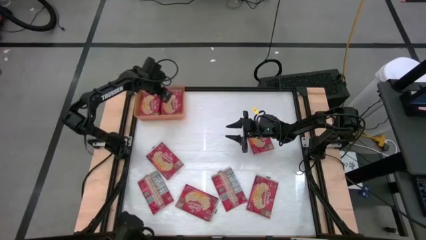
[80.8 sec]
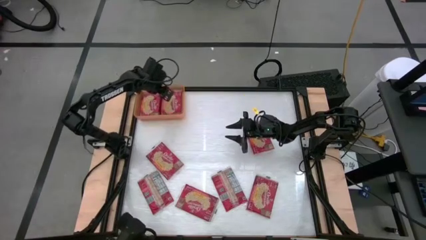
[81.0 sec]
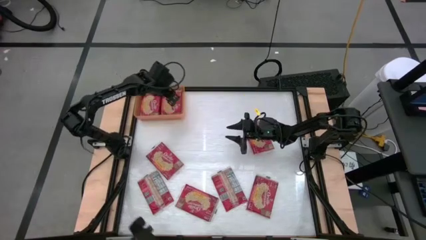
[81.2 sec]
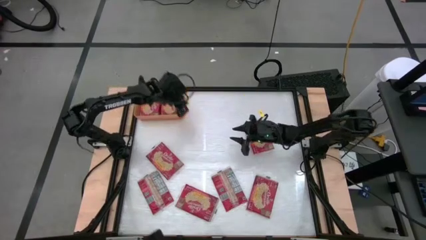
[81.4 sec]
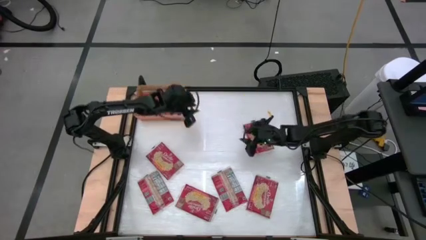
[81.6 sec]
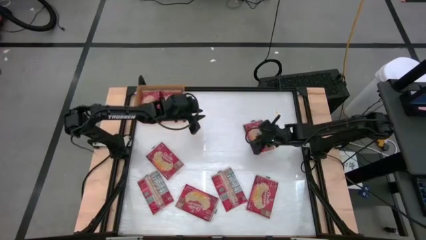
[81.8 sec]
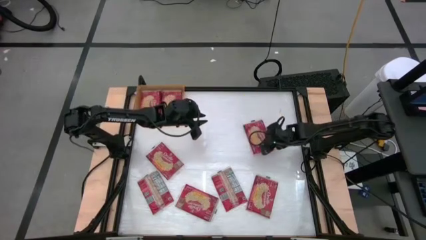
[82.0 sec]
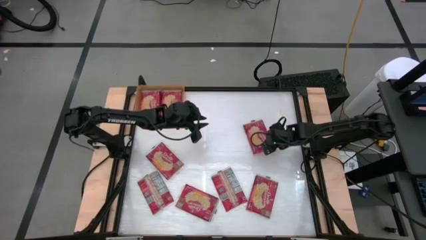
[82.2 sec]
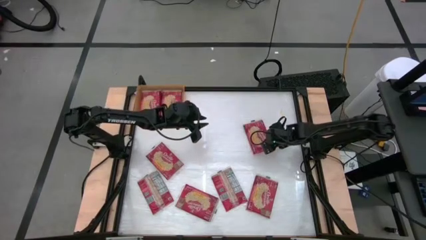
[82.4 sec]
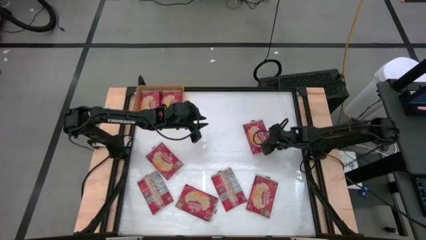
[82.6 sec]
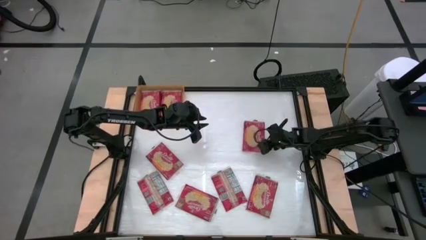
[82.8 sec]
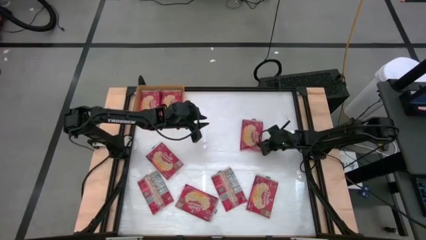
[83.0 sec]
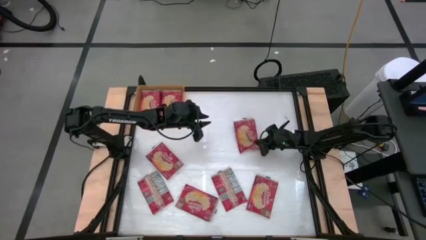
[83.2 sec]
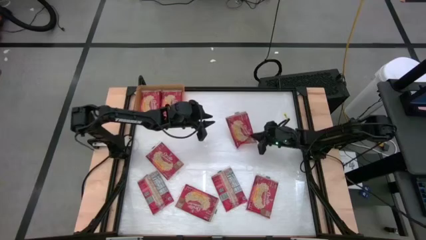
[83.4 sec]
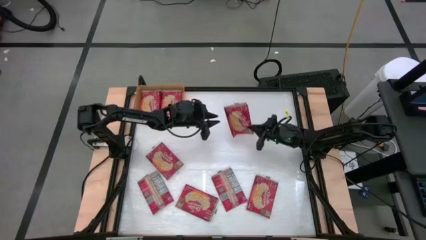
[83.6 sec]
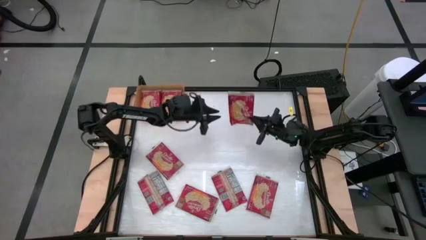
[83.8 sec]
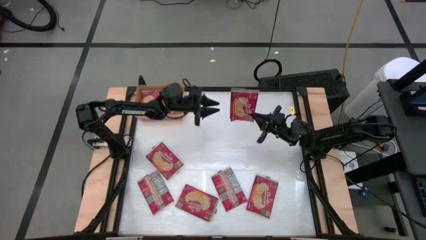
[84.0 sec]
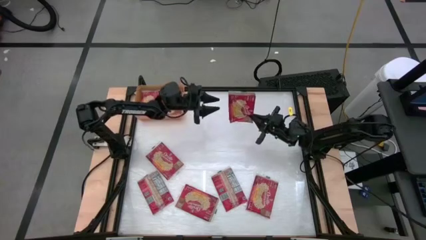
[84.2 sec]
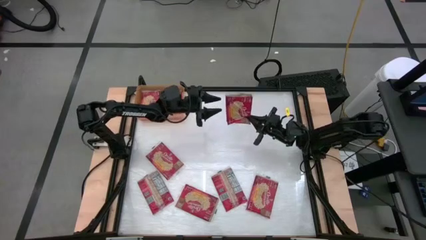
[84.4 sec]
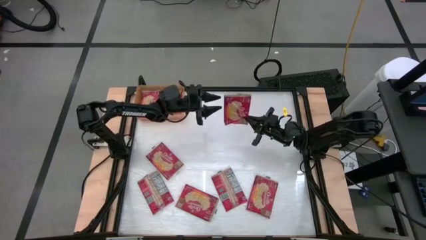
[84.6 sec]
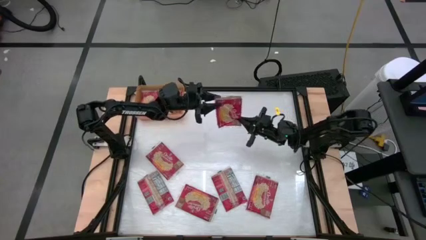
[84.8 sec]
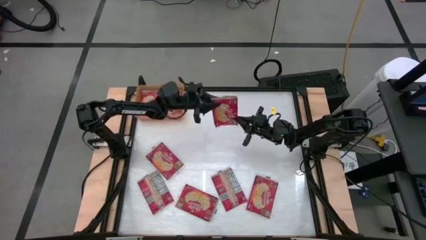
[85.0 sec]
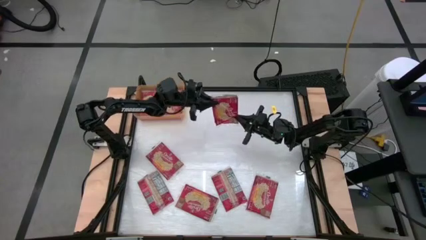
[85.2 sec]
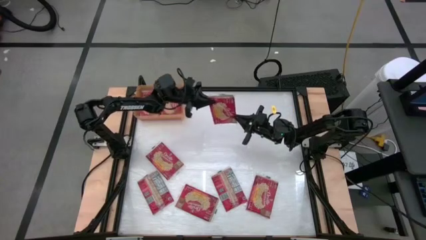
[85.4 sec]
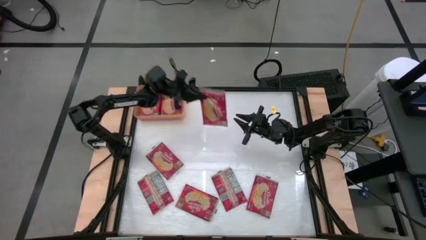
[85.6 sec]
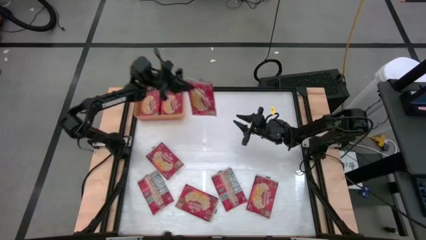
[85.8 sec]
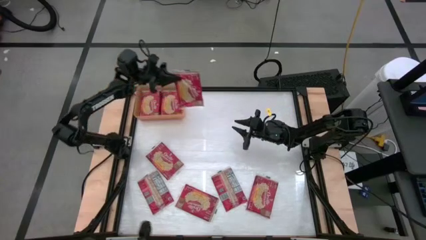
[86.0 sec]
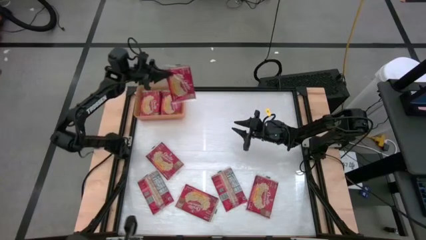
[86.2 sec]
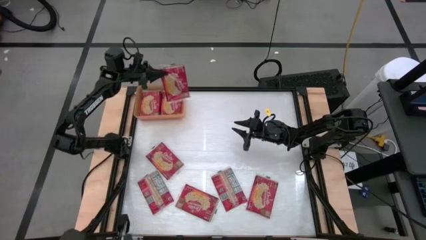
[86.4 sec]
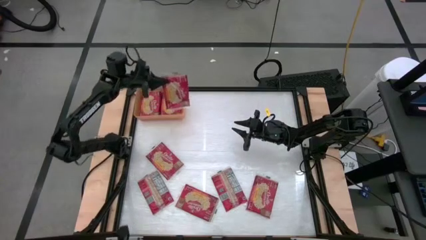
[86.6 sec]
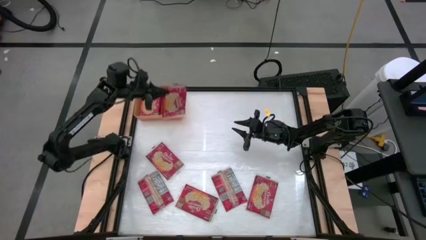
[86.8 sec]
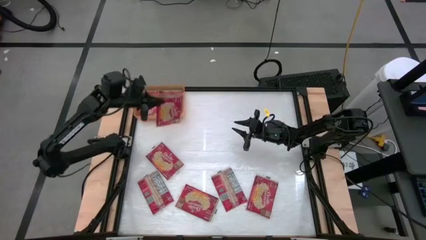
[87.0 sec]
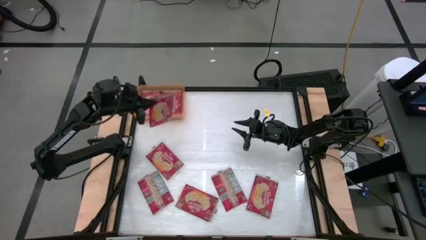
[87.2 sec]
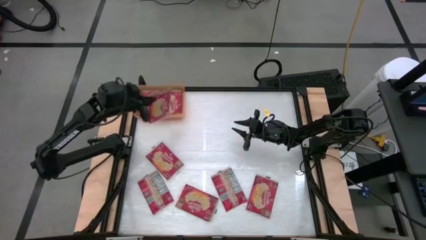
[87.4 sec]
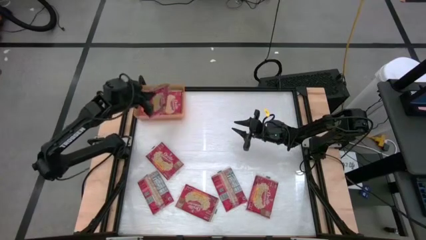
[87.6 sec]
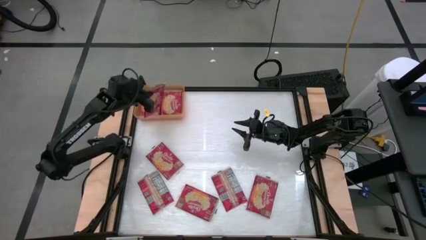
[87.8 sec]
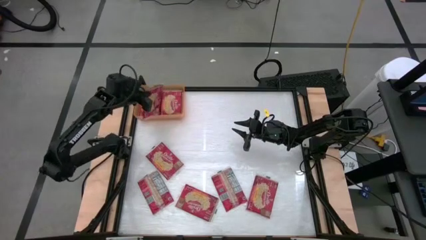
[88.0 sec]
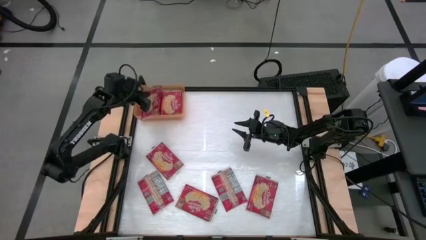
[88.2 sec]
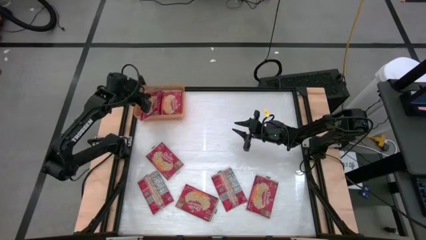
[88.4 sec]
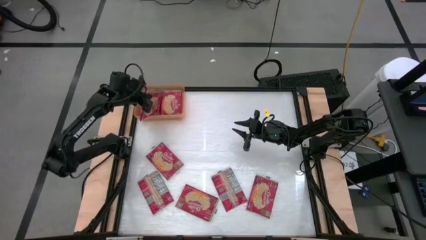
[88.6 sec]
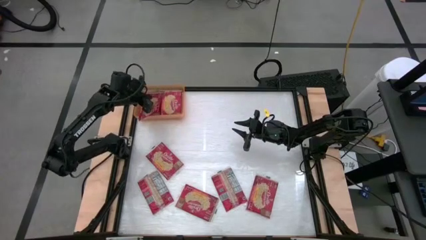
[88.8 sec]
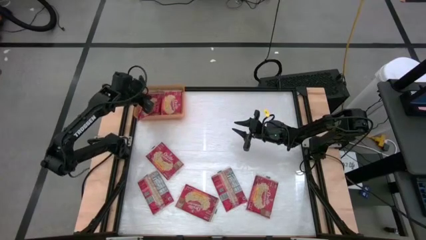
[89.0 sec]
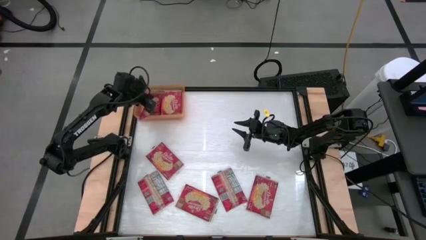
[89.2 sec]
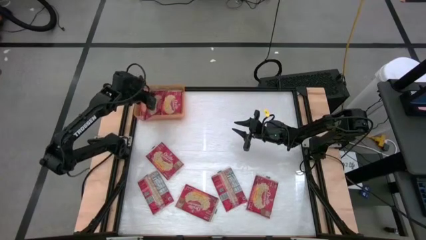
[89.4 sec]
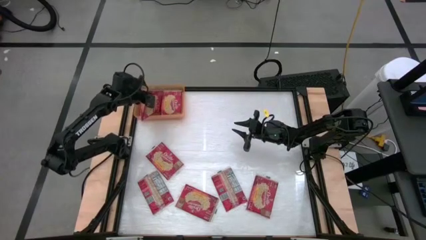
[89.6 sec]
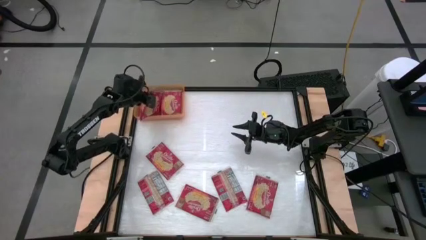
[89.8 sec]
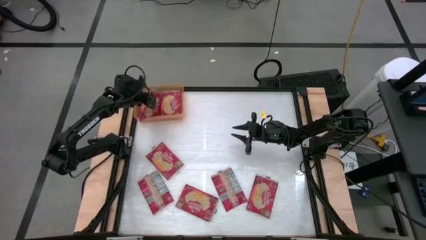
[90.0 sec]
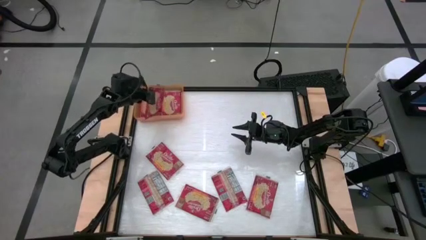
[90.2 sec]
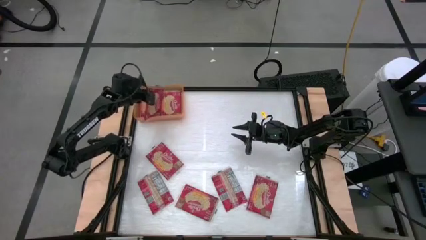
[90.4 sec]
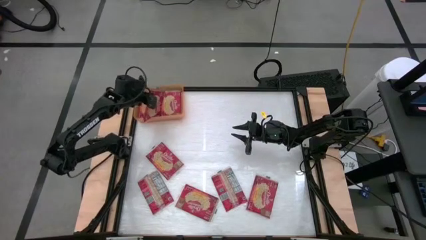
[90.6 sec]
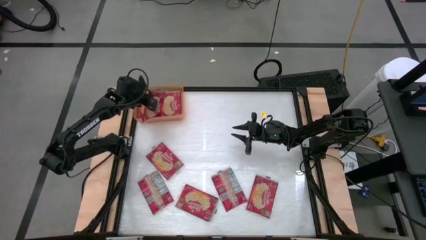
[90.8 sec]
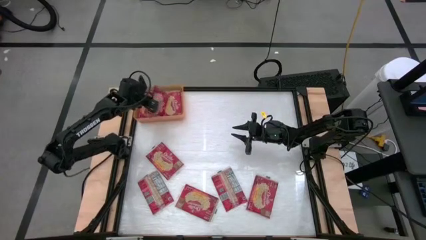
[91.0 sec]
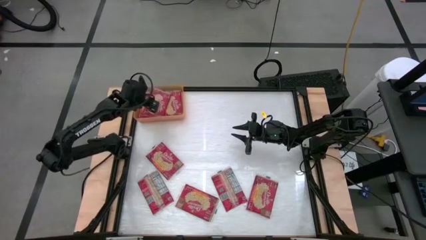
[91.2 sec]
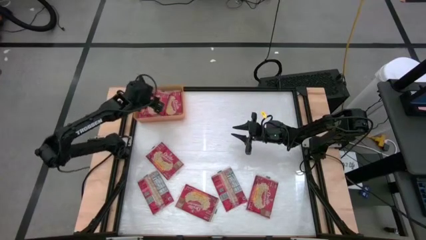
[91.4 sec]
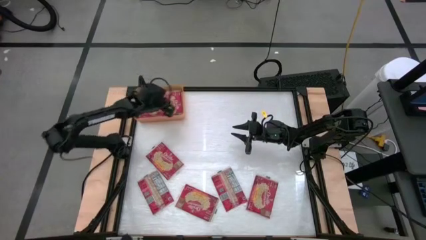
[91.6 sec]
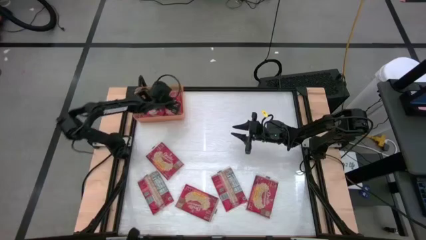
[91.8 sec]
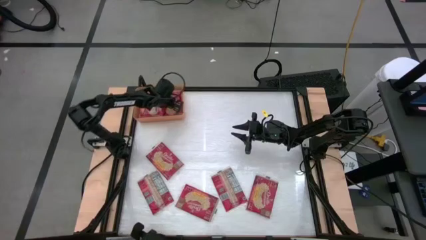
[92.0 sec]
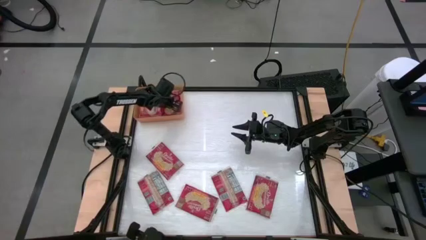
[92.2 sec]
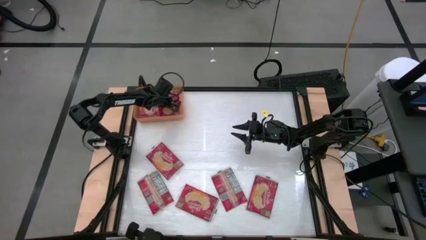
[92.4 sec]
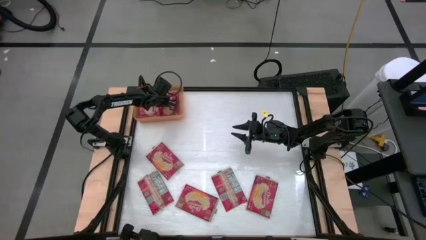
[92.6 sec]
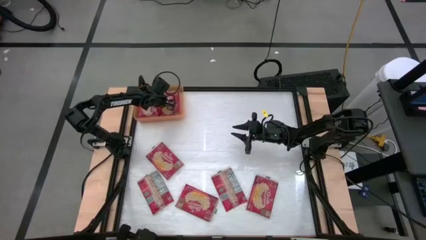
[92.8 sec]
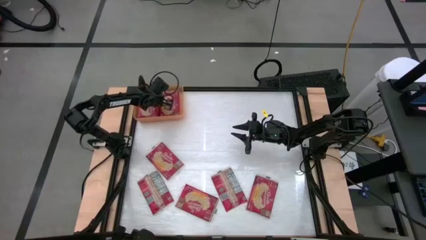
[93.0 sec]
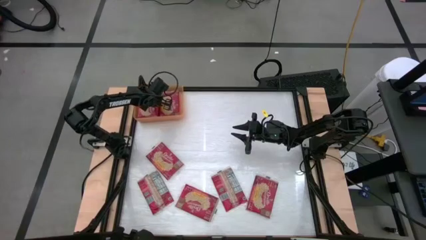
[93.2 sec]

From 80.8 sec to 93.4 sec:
Task: Sort popcorn bags into baskets
Put the red popcorn bag into the orange bin

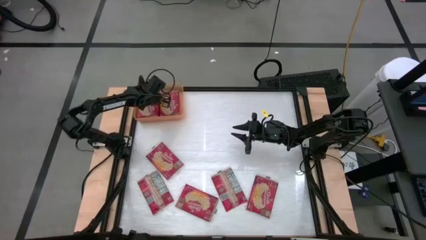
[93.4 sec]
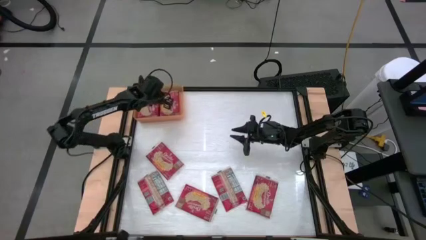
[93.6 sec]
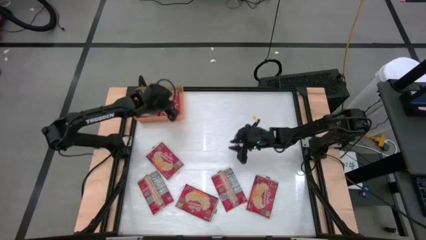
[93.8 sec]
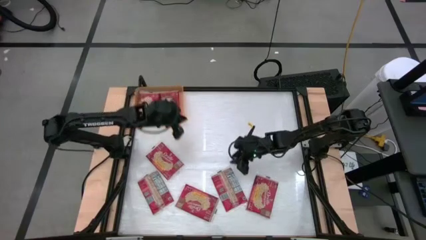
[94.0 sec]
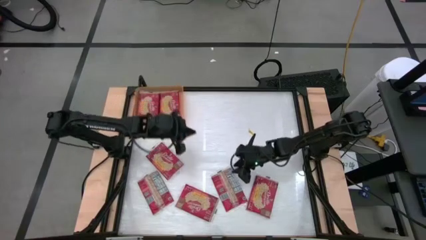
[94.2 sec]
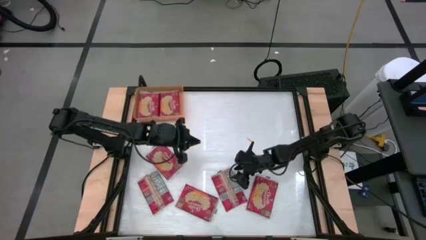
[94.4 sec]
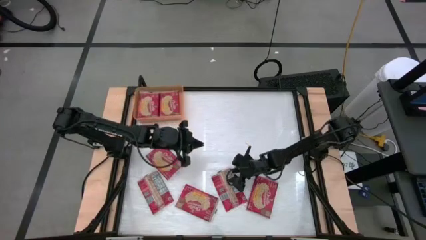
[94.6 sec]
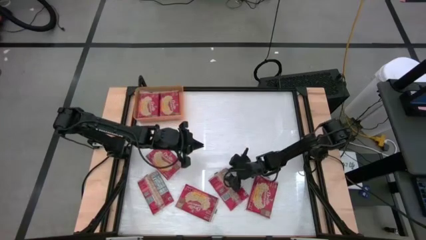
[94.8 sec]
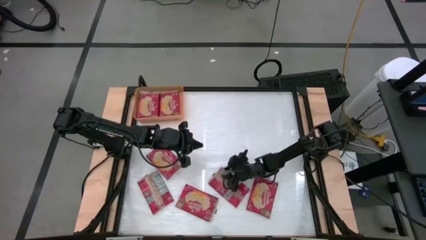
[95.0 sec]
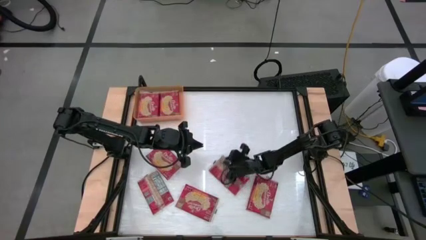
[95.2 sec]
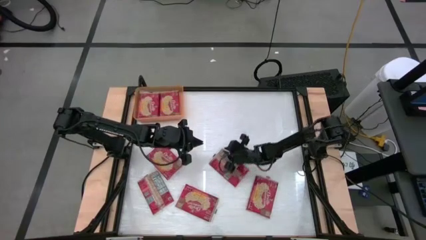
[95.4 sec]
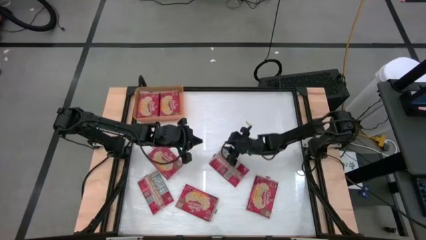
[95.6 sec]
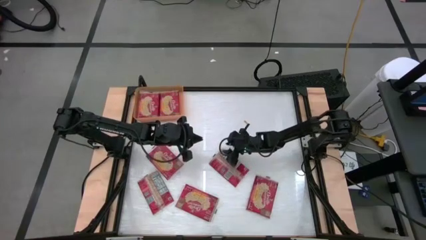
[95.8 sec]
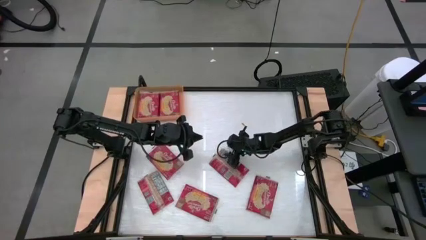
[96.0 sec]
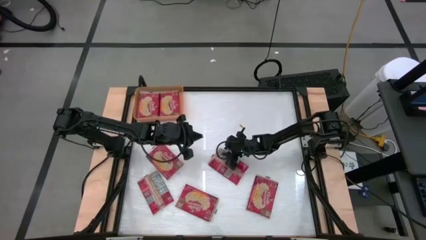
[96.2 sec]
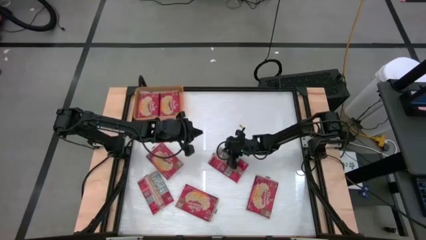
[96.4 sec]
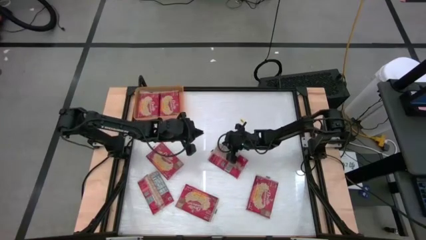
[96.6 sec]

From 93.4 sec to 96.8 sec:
Put the red popcorn bag into the orange bin
